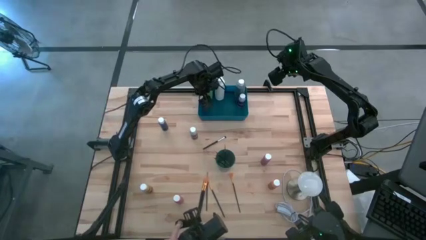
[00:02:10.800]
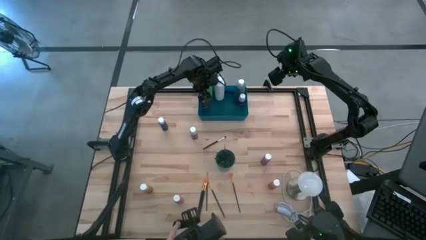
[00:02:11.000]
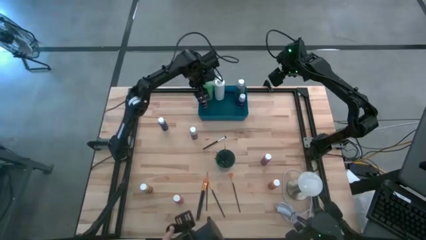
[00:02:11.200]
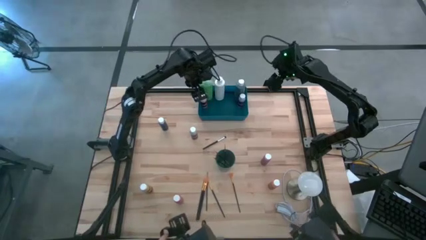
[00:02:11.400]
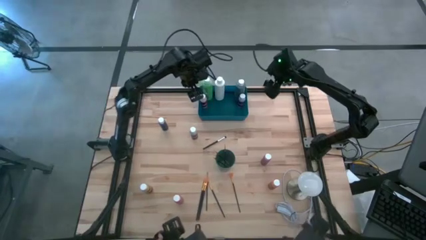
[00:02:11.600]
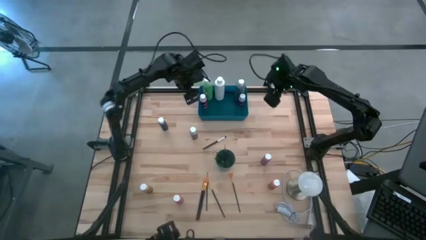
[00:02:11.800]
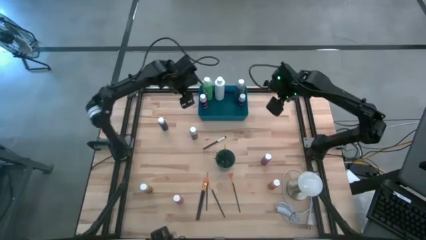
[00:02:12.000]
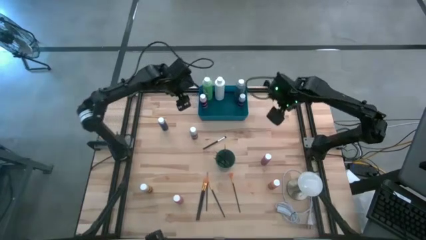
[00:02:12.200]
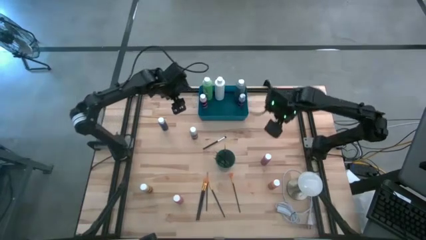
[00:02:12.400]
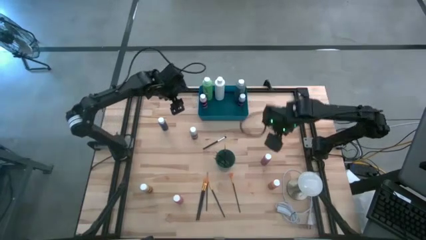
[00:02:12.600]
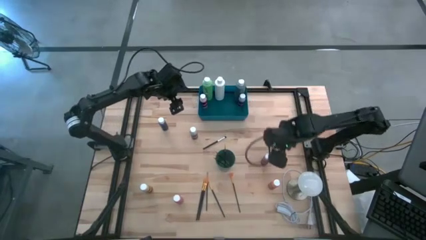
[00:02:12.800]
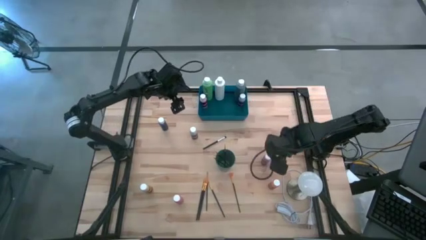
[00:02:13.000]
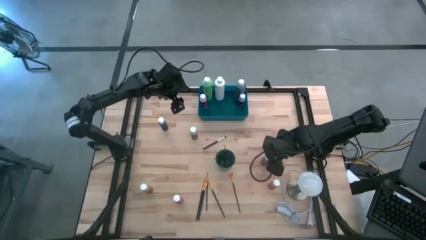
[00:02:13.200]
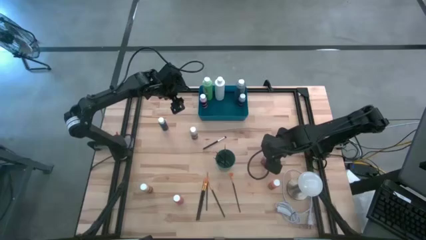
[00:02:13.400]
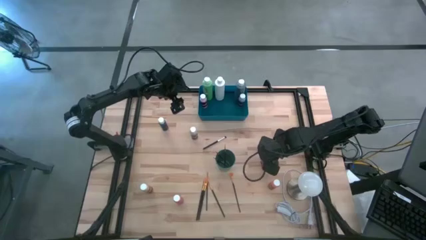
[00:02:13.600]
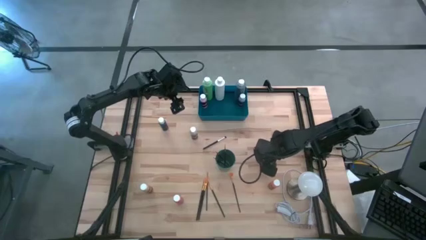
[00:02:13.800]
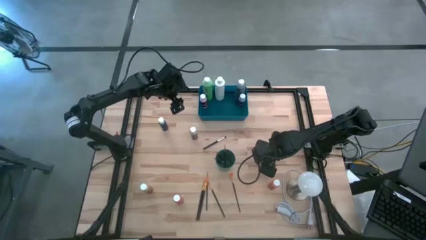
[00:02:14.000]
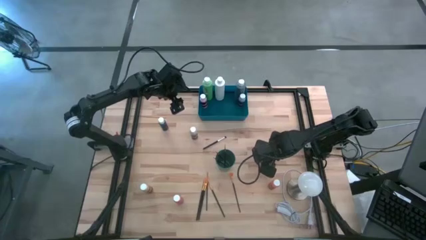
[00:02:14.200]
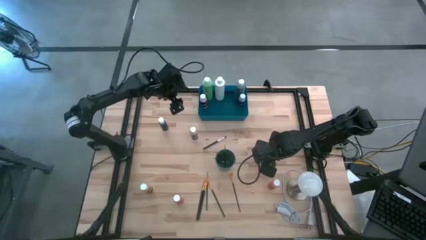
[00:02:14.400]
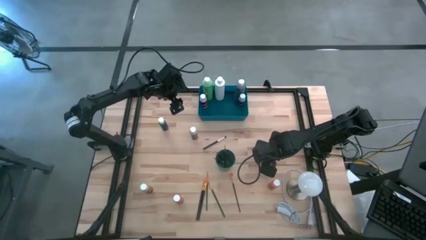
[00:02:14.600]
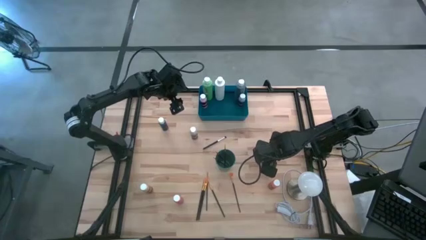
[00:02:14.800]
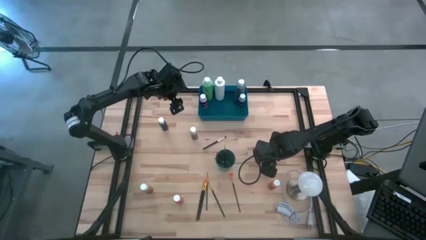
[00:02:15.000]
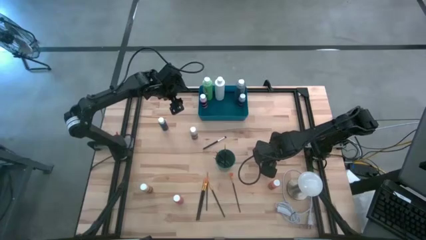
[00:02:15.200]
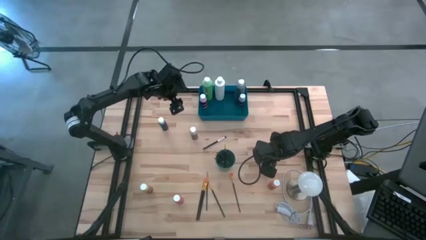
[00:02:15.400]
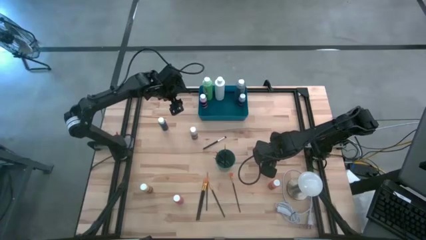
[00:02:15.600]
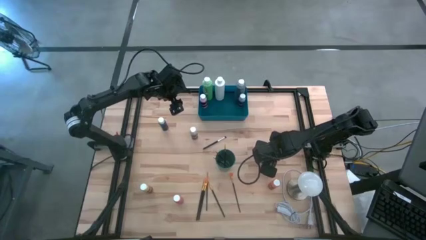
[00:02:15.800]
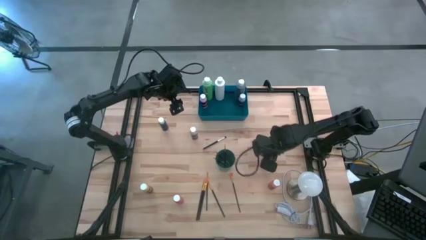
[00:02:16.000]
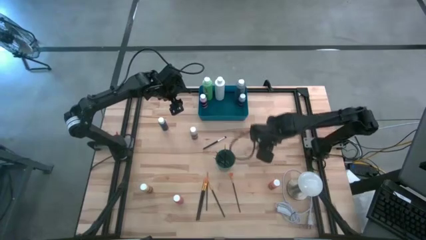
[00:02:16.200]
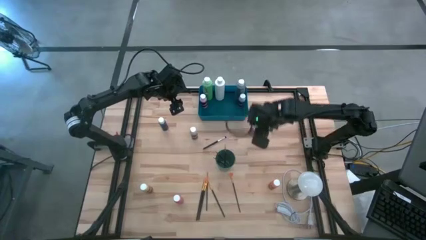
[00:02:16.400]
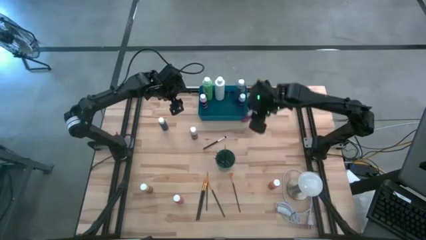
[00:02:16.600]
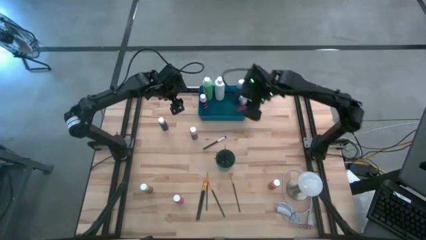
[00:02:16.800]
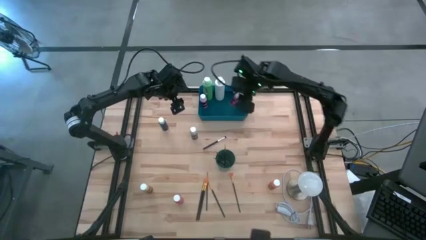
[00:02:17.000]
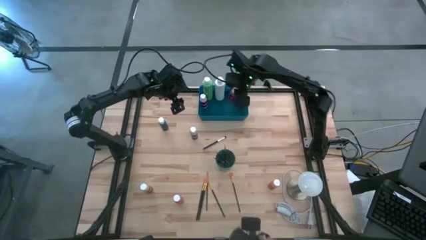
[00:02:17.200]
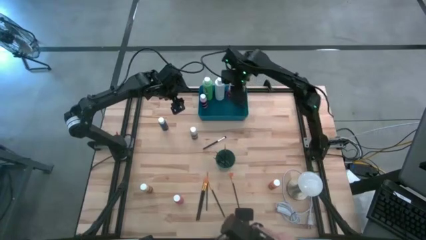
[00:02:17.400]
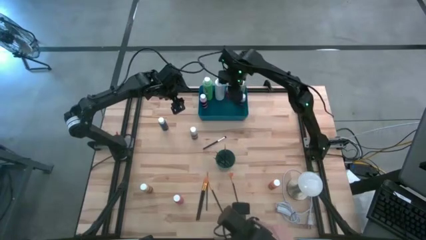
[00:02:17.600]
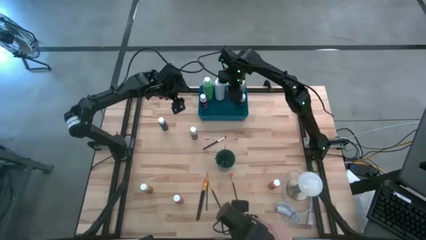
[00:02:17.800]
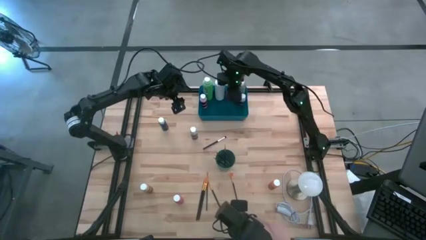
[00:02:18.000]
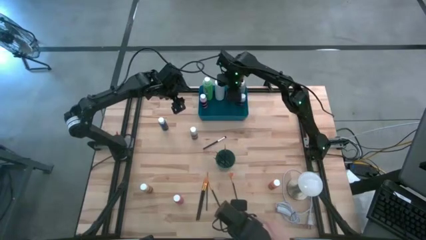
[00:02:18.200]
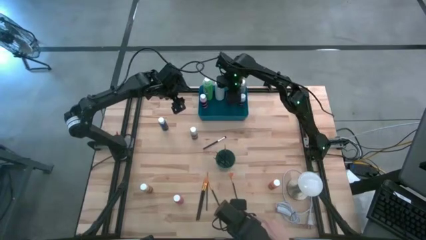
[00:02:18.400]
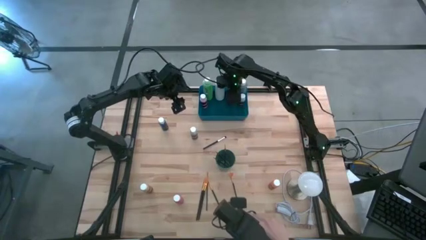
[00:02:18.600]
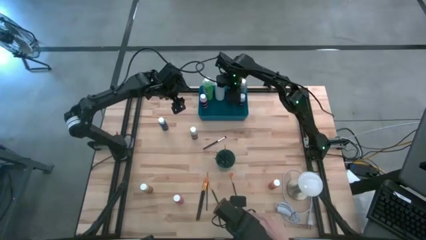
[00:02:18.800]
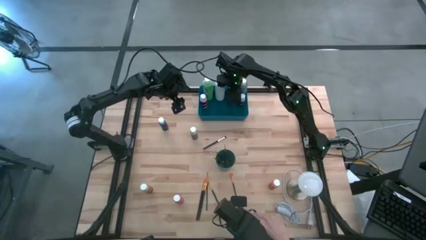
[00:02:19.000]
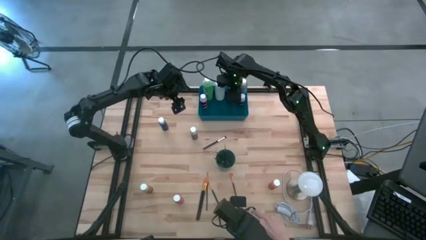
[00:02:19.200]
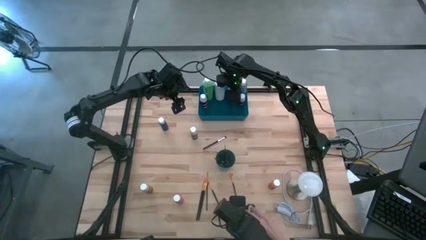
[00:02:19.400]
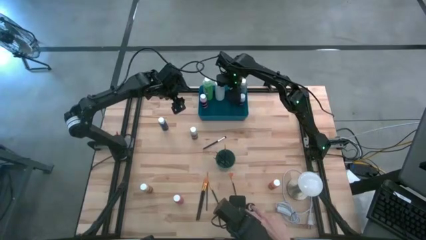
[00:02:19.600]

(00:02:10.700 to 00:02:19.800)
Task: Pick & Place Paint Supplies
Put the red paint bottle into the blue bin

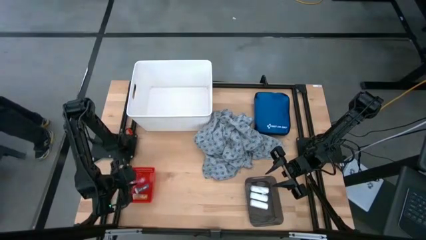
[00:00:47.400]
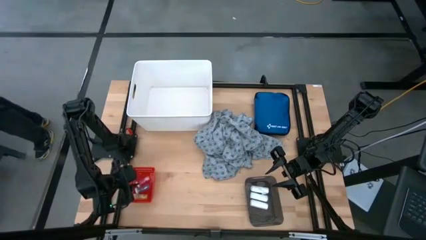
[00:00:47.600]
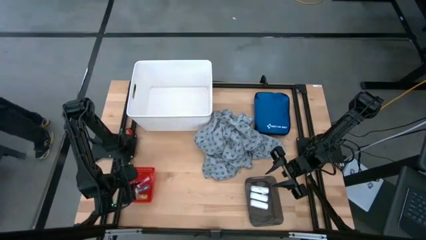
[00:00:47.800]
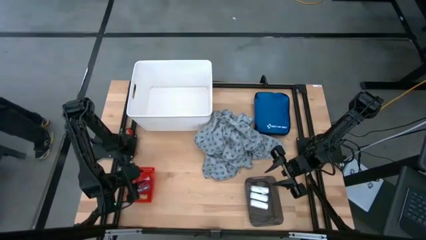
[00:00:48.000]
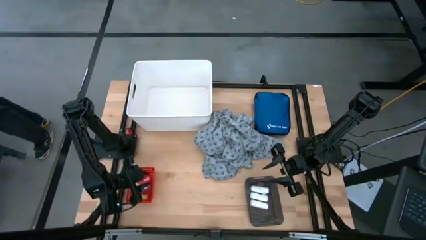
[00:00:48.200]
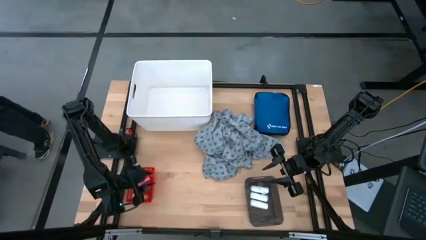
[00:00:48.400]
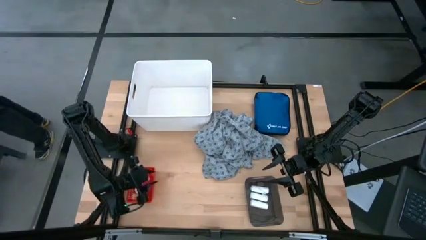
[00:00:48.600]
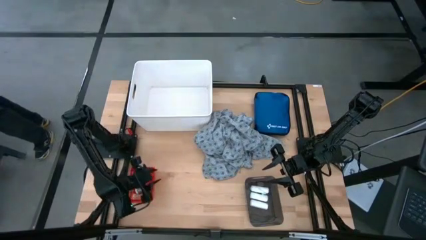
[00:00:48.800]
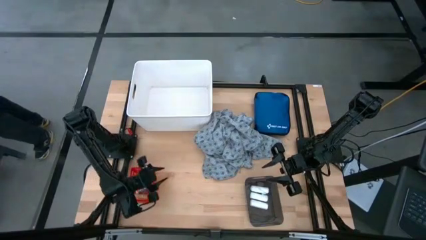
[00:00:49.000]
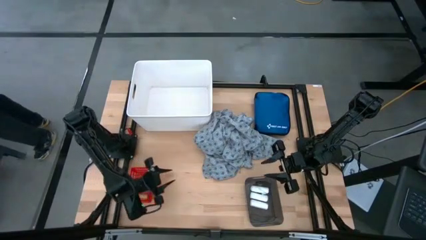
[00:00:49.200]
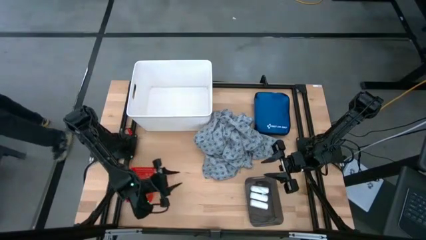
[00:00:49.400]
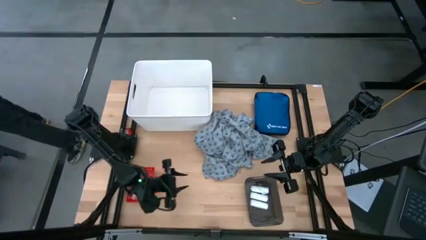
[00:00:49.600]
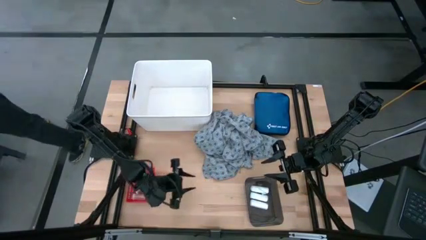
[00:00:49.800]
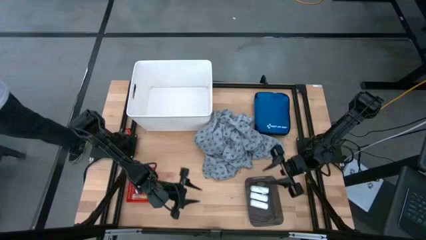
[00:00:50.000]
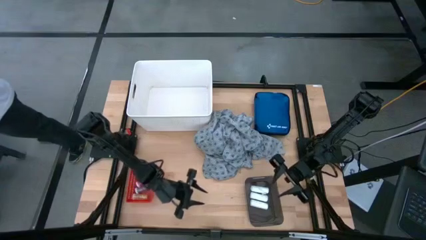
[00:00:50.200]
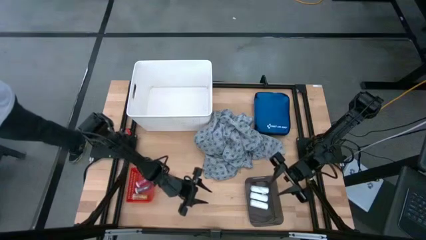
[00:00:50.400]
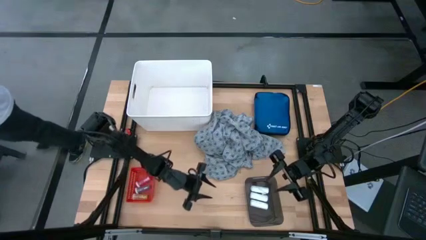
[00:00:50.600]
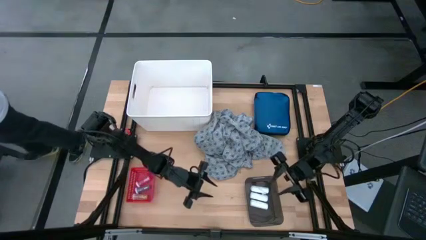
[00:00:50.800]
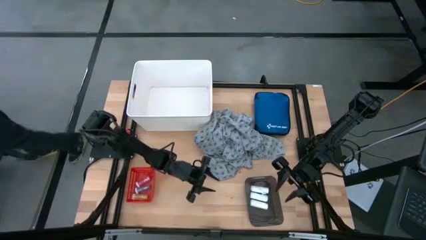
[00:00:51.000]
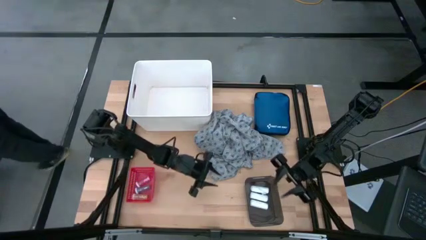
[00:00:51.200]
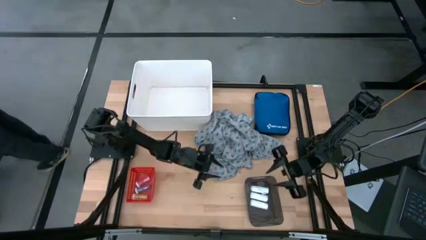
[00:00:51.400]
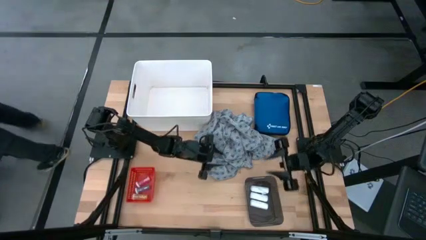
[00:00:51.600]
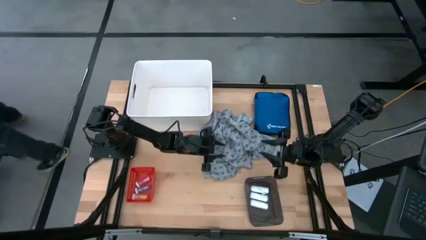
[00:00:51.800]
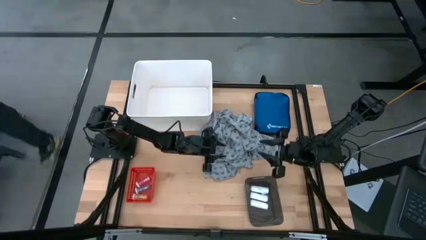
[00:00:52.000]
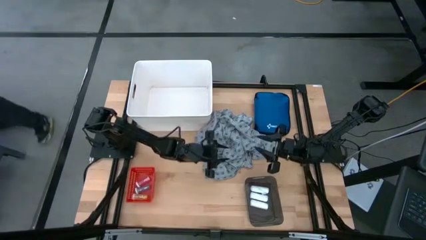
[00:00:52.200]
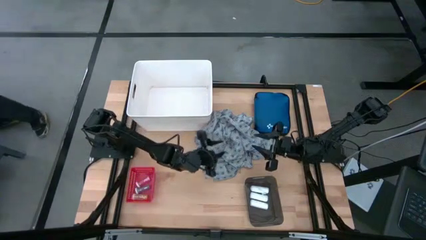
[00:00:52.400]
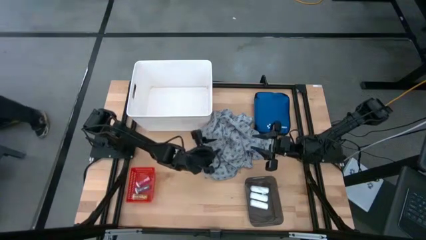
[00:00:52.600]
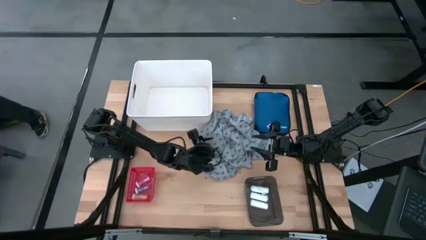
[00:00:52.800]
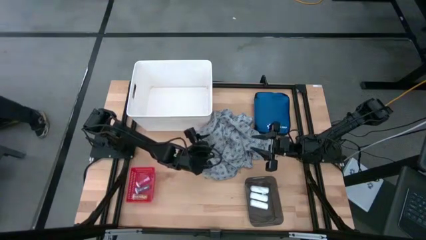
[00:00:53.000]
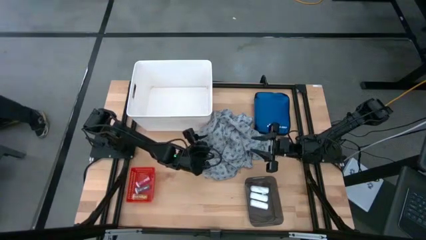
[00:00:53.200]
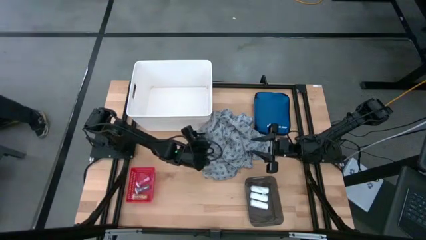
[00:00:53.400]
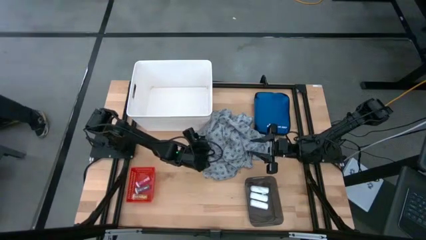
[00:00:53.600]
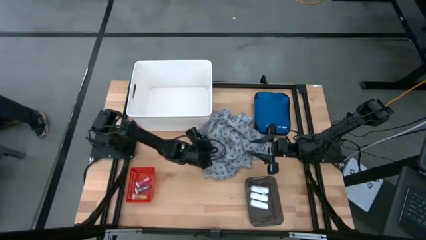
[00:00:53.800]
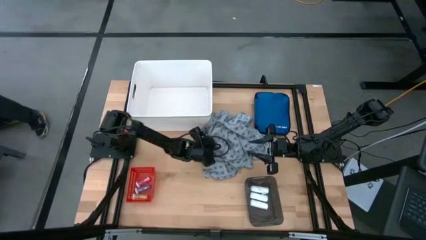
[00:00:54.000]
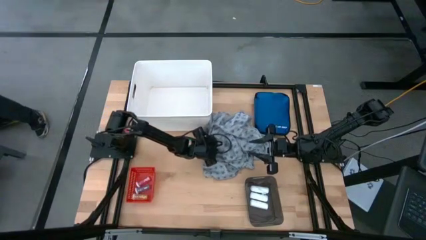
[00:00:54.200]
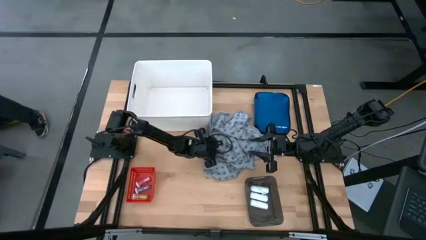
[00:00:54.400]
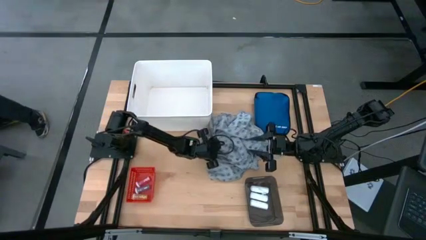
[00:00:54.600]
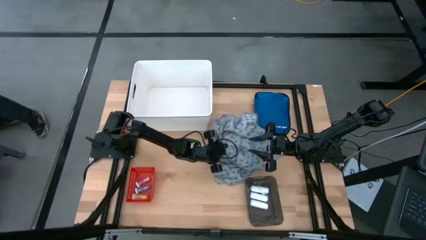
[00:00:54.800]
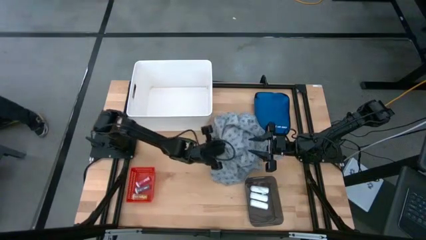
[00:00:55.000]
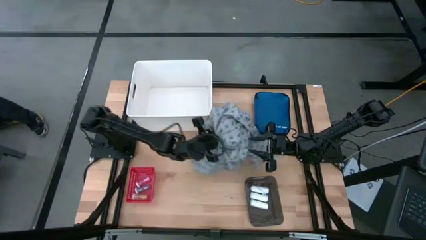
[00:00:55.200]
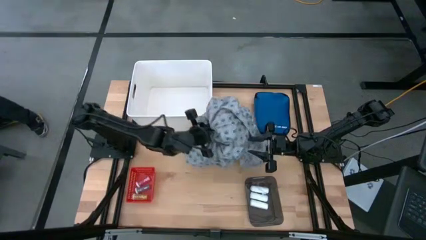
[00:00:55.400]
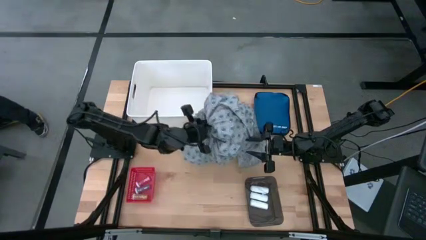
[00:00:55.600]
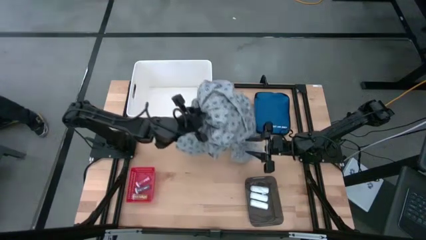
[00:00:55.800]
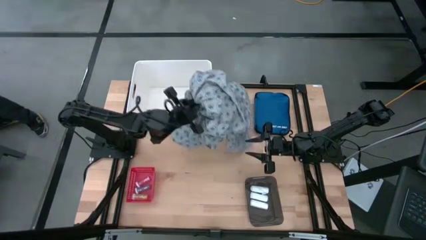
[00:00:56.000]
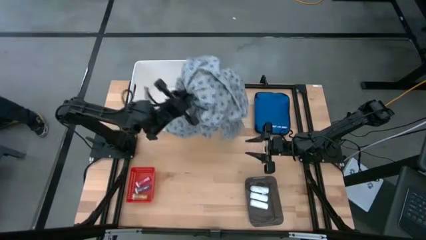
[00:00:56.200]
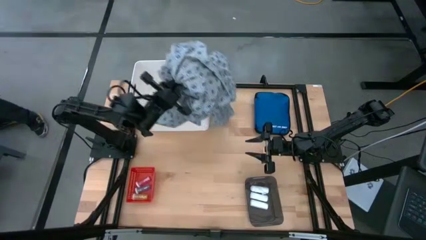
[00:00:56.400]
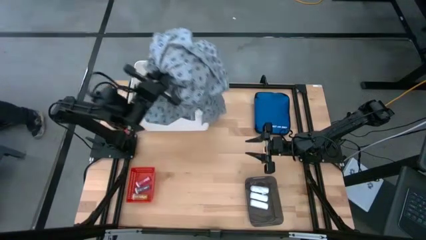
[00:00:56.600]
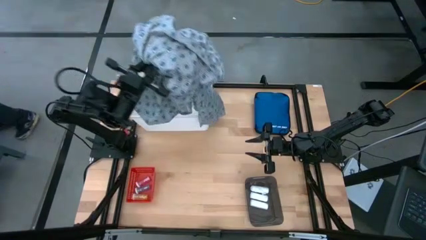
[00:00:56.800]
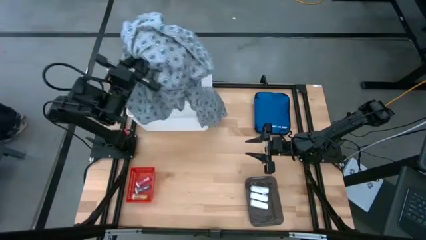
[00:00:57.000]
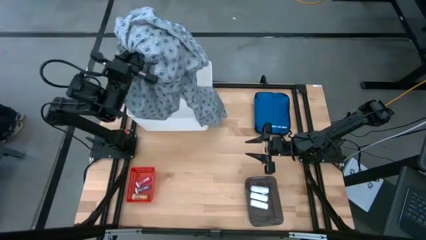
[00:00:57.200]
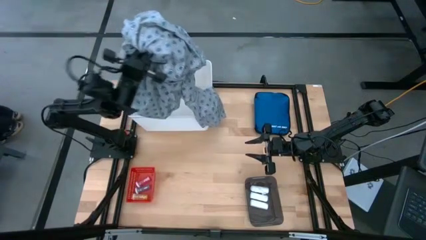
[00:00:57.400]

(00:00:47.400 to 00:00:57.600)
Task: Pick & Place Medicine items
Put the gray patient gown into the white bin
